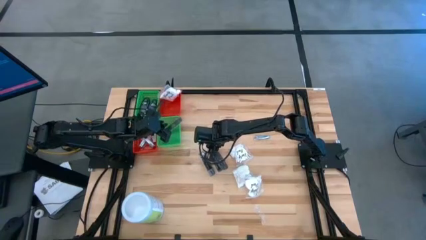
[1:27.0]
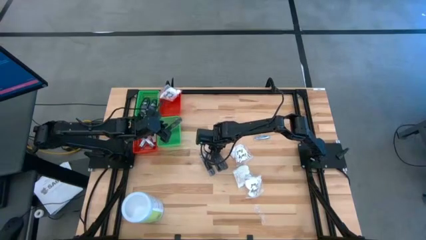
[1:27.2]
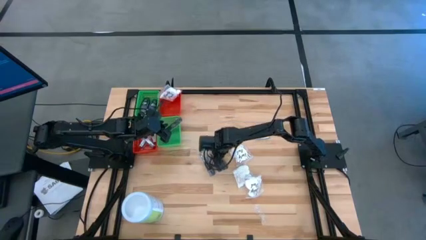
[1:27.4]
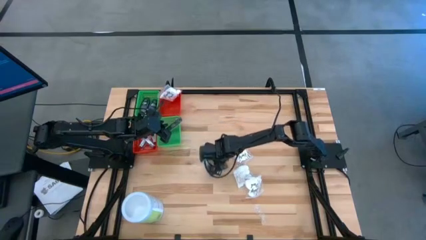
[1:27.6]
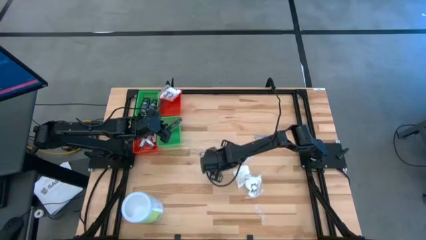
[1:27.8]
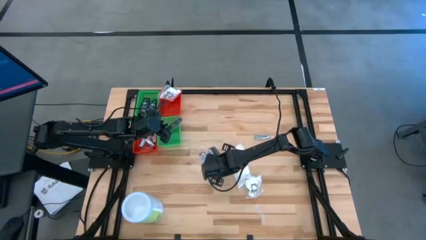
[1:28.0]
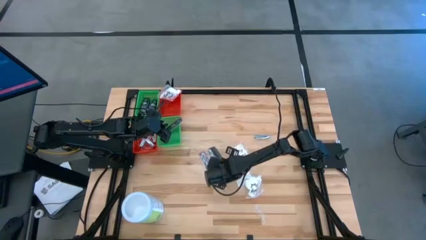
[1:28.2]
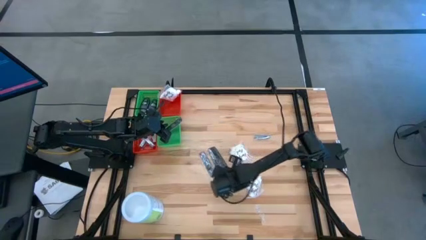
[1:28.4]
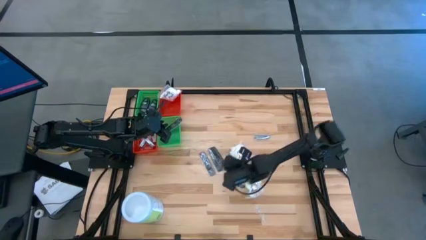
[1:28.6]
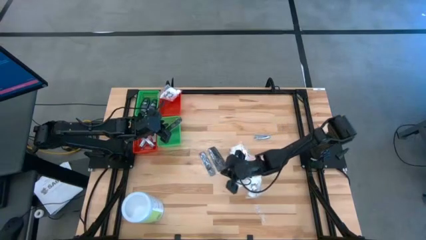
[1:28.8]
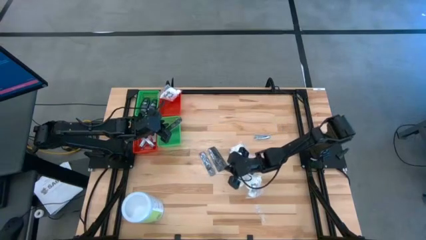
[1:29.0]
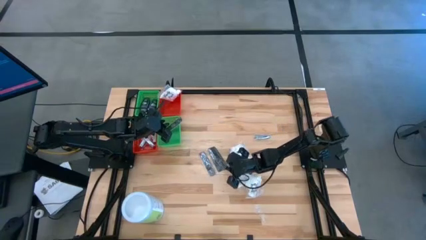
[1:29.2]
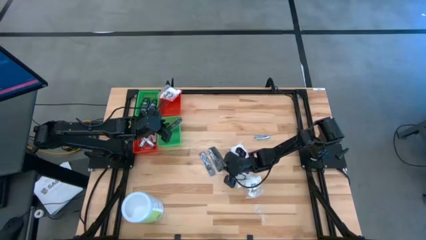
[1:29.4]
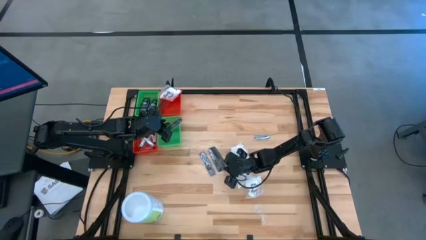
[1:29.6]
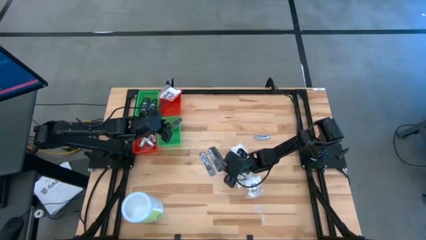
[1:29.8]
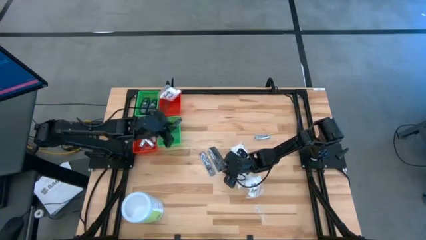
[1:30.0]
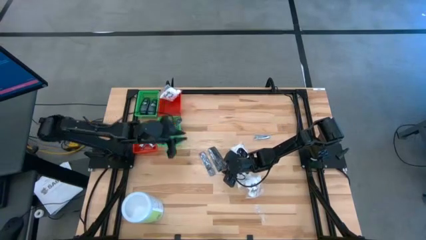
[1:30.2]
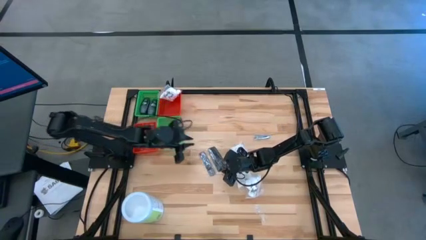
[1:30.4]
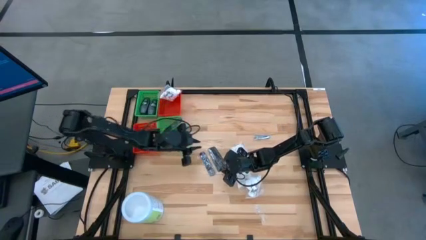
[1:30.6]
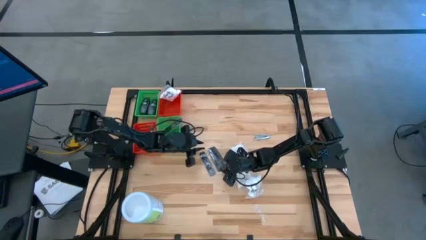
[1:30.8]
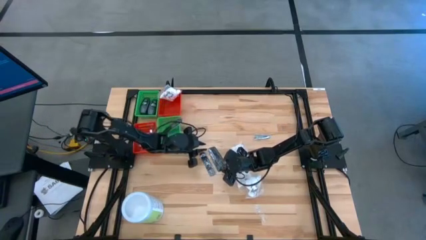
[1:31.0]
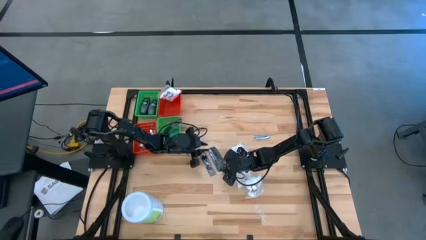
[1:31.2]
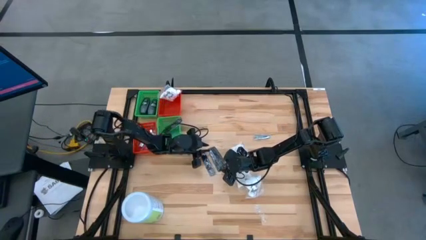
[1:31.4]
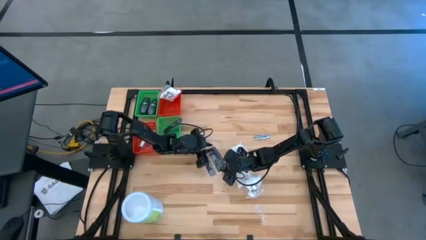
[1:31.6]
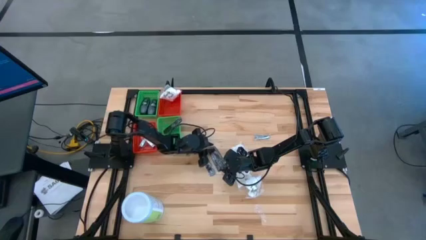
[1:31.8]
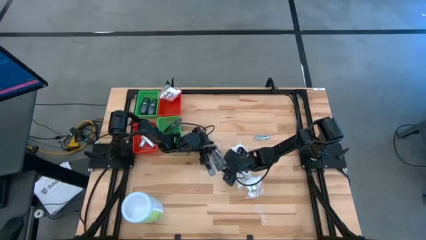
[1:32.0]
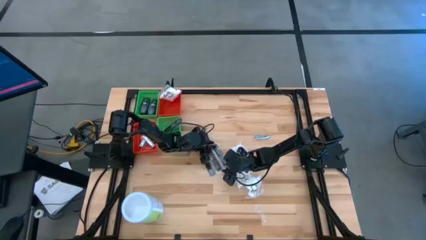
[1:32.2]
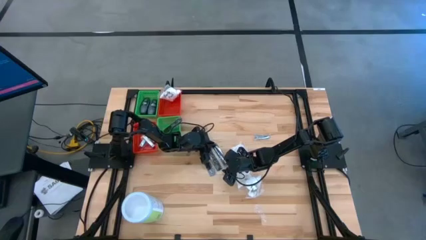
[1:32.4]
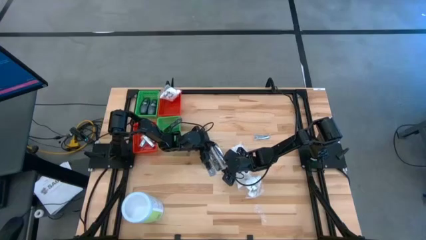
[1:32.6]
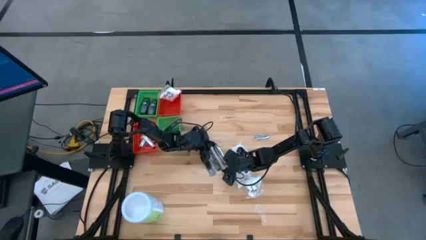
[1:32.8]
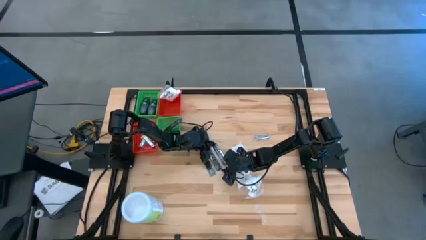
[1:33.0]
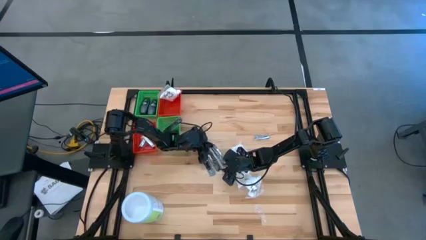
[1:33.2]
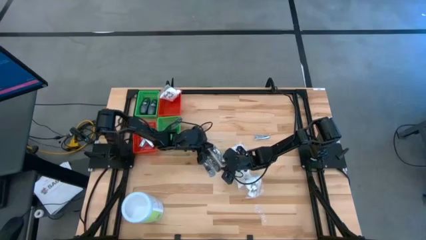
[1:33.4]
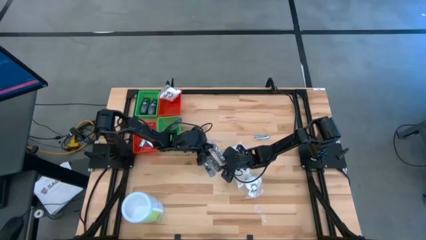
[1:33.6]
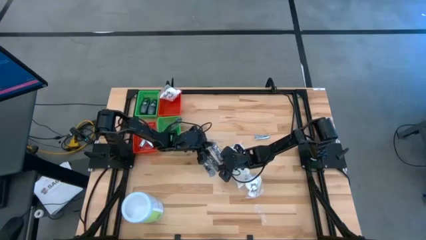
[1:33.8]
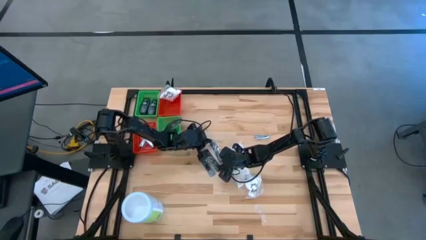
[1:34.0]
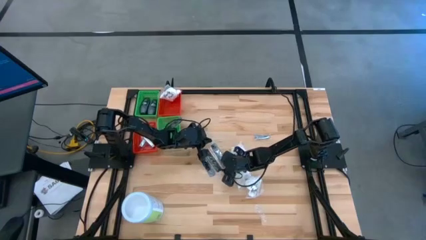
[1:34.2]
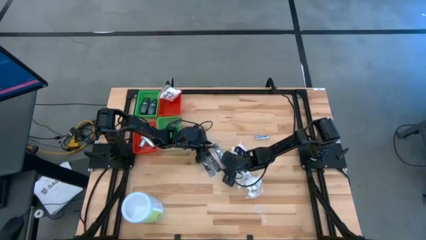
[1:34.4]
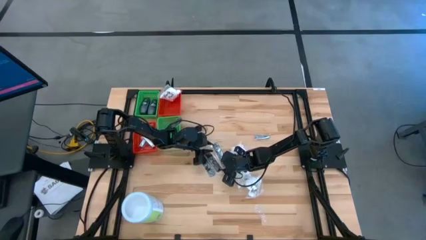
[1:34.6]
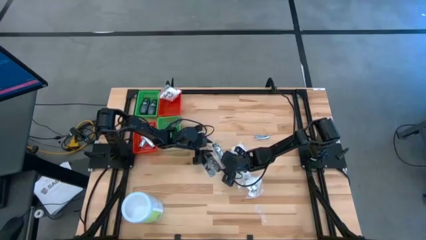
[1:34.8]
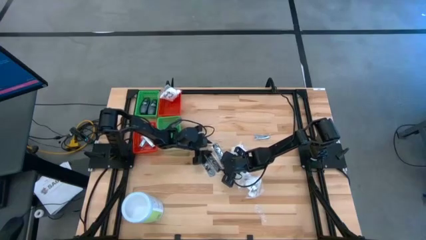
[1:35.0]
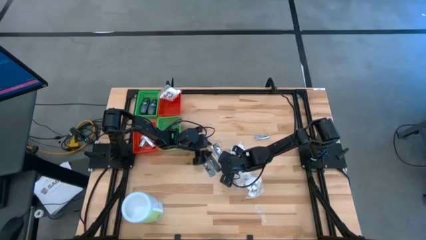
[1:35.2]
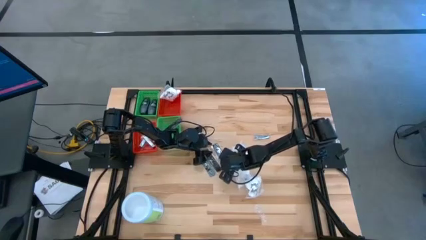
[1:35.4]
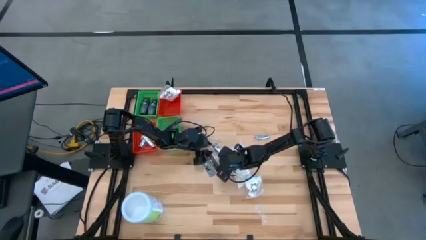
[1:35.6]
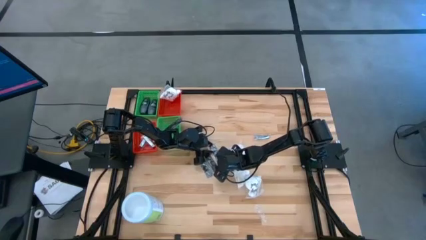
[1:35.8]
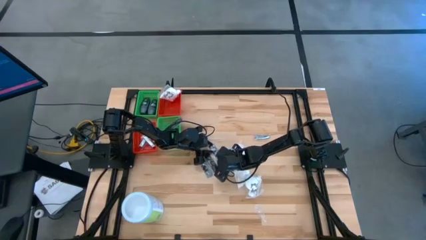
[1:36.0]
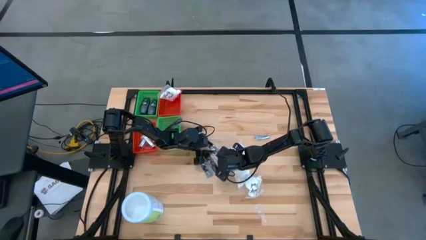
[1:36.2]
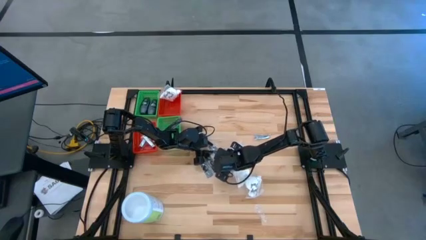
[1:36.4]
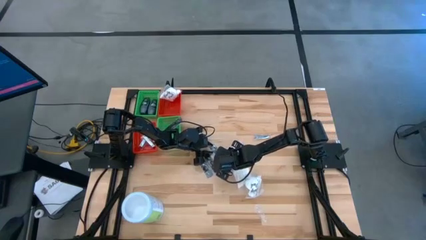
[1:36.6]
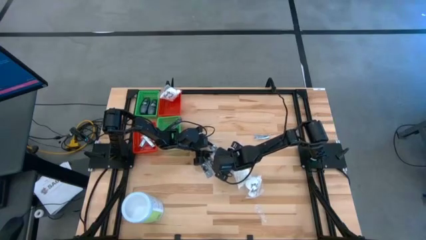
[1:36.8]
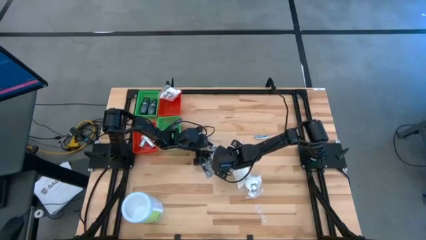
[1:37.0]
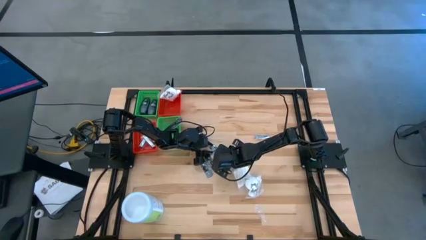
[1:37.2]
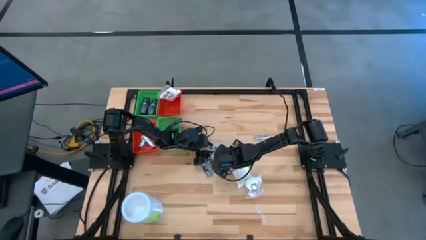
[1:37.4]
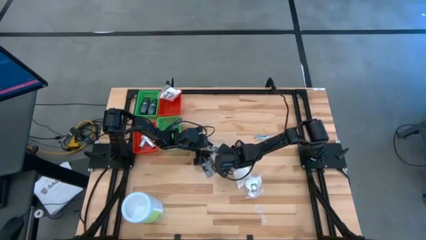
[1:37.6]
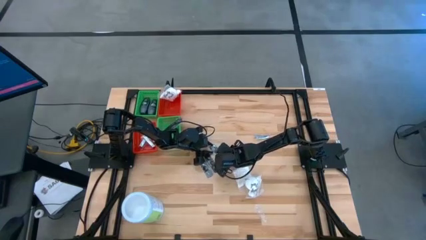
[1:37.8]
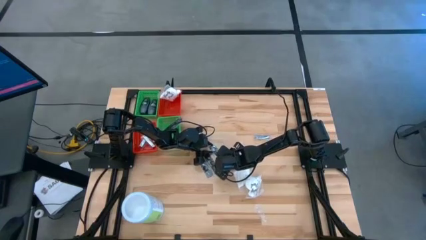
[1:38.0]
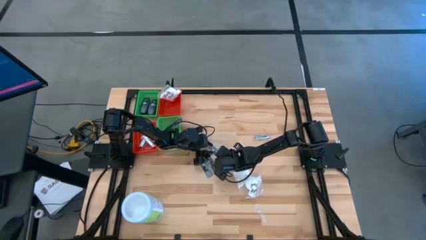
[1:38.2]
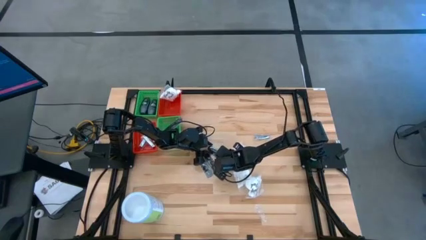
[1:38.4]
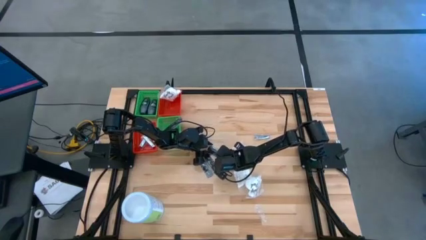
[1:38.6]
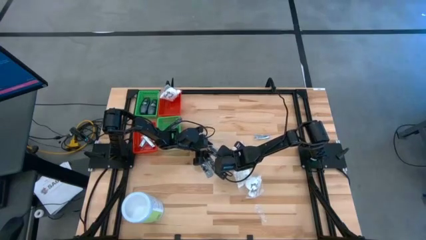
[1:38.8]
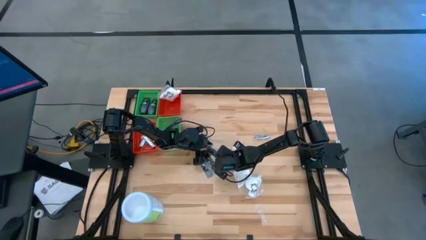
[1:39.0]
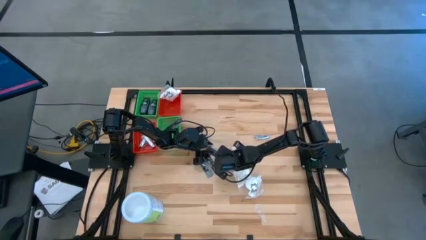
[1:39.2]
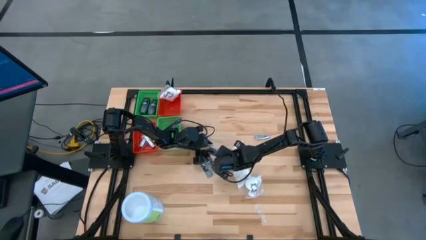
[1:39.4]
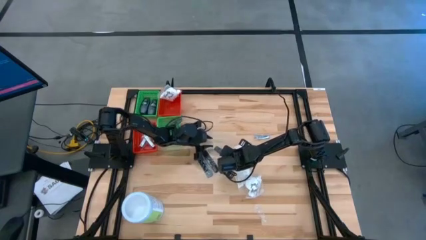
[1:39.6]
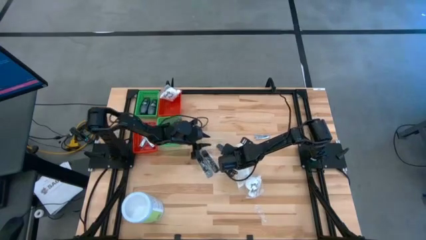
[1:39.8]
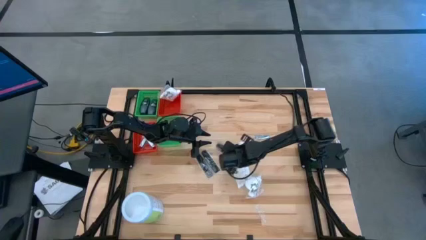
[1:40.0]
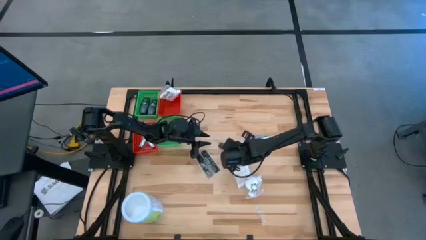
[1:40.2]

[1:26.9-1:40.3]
Task: Pick & Place Travel size toiletries
Put the black comb into the bottom green bin

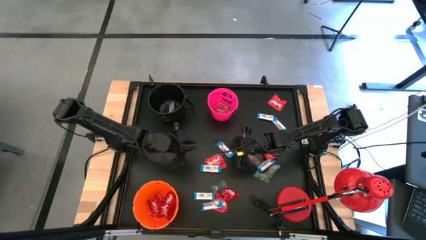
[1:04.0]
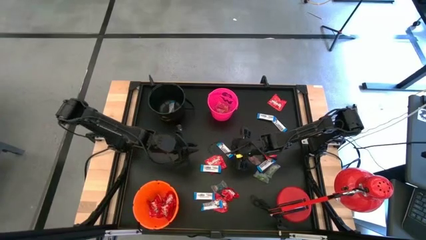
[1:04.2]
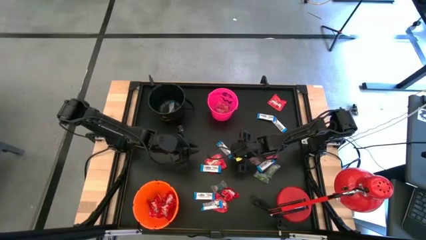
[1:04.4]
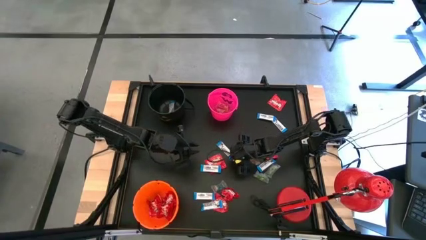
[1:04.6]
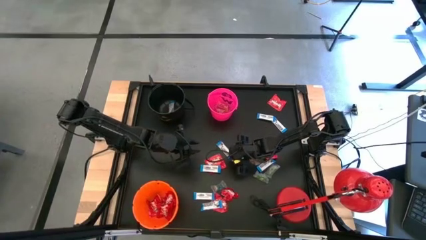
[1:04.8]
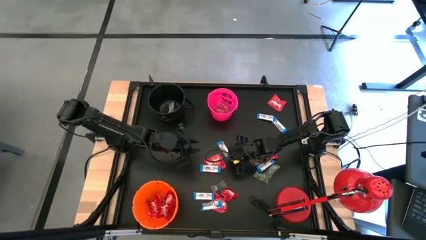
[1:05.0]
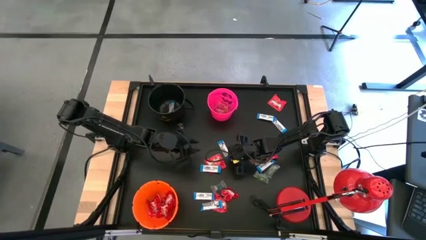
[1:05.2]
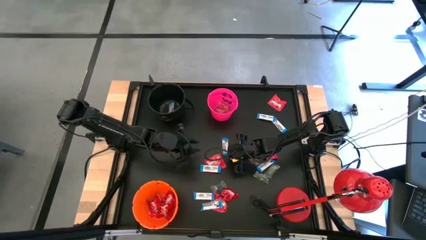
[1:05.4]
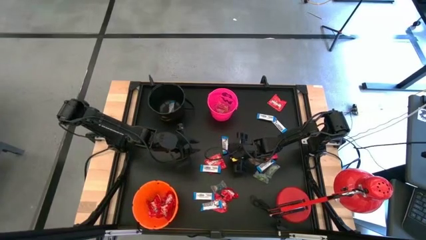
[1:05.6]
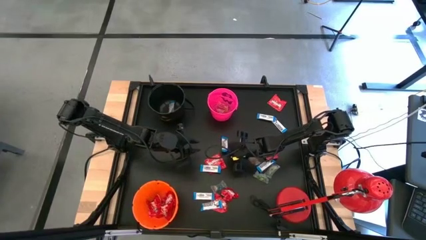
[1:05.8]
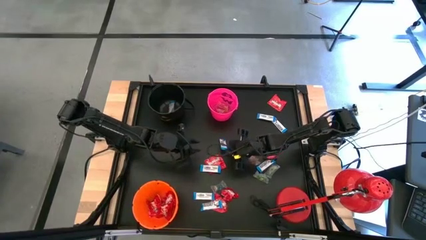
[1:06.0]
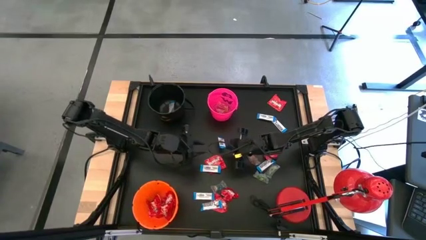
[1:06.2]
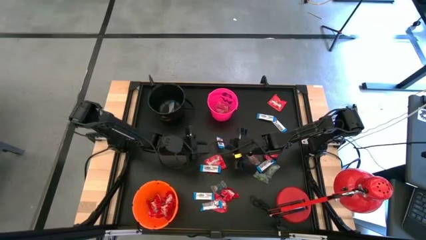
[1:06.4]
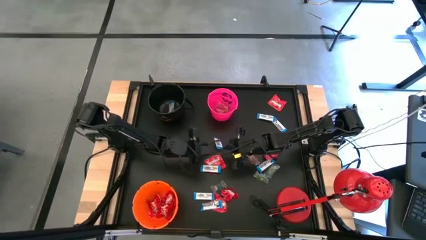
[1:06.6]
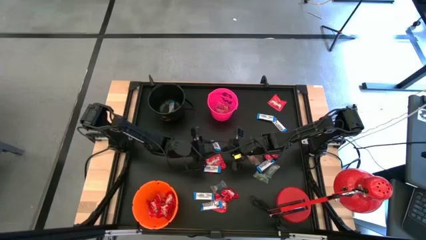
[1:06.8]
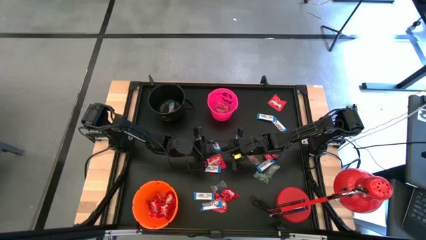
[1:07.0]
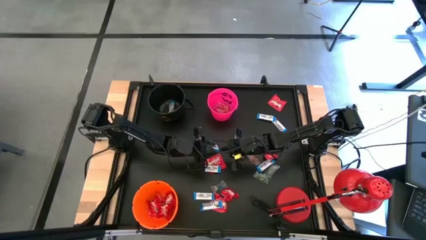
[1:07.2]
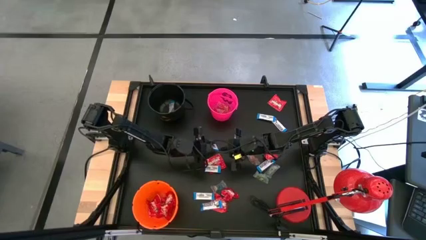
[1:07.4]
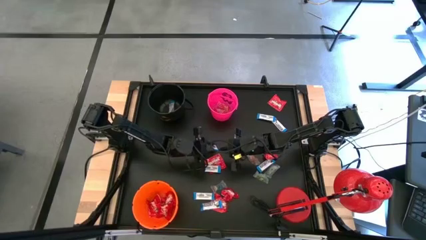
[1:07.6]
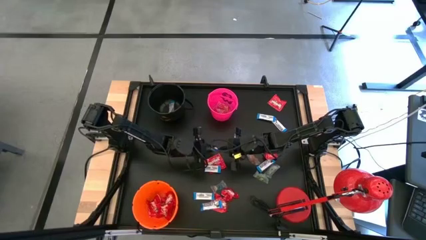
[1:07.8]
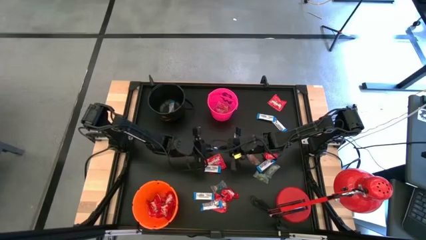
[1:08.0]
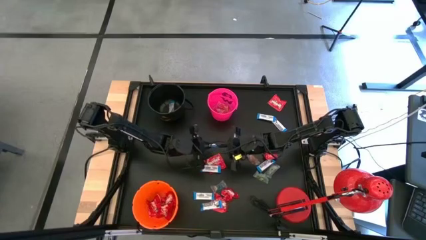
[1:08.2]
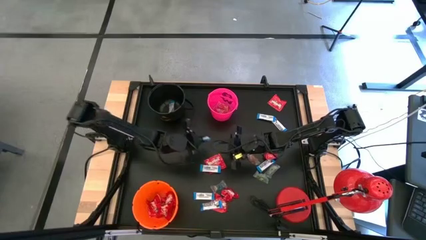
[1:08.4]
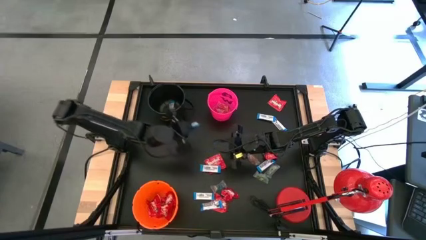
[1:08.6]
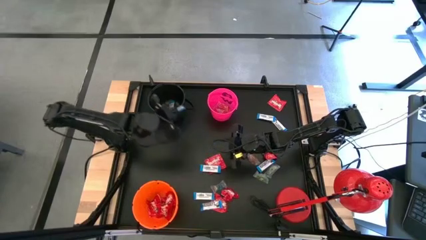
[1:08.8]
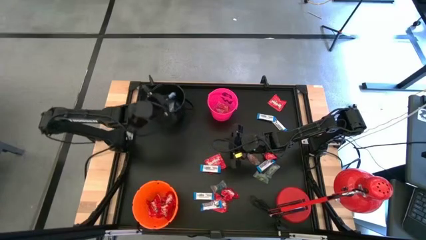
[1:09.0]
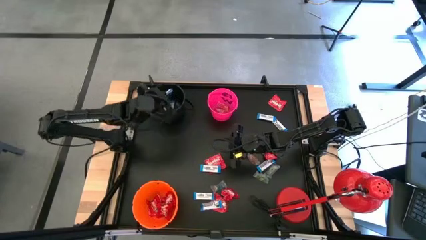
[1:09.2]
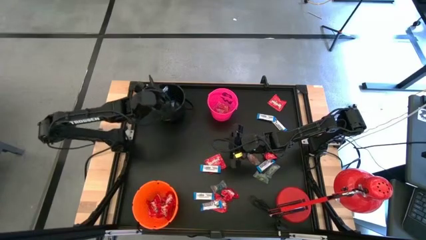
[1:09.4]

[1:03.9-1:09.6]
Task: Organize candy in baskets
Put the white chocolate bar into the black bucket
